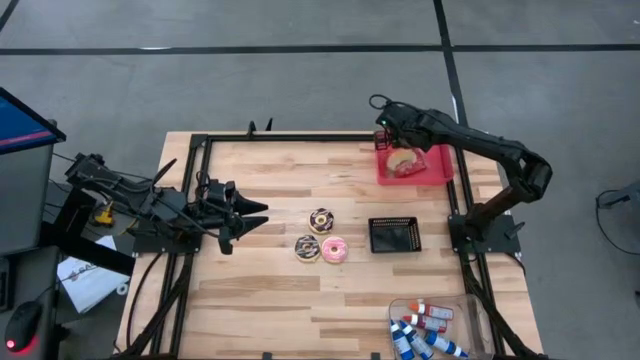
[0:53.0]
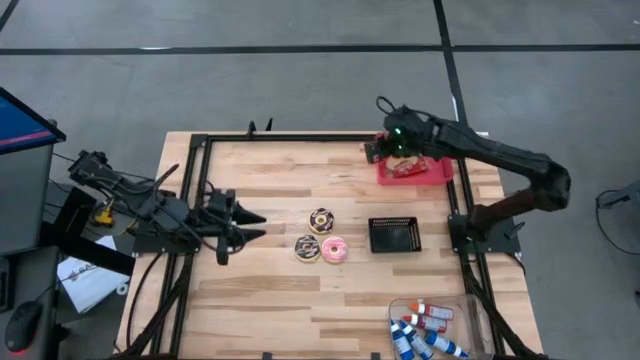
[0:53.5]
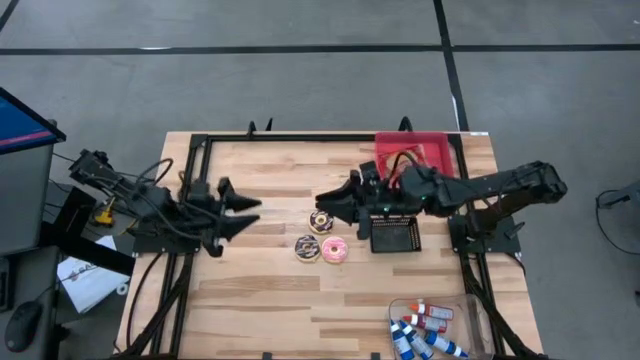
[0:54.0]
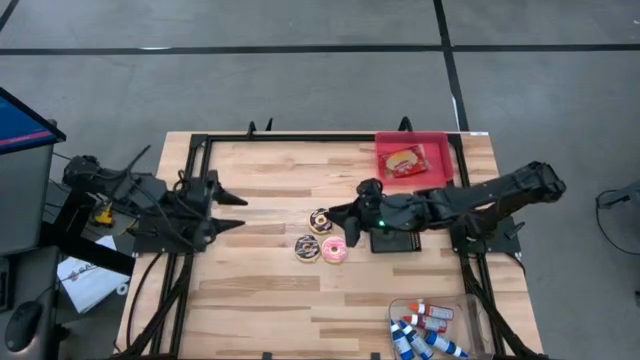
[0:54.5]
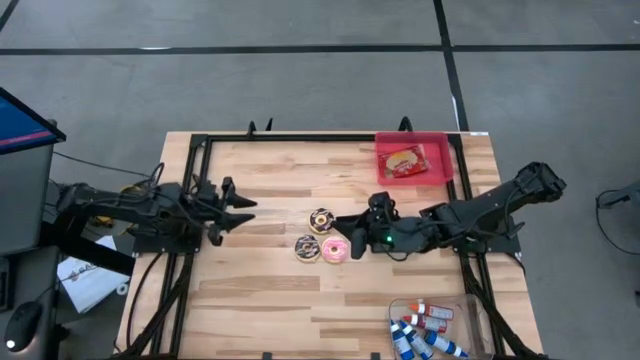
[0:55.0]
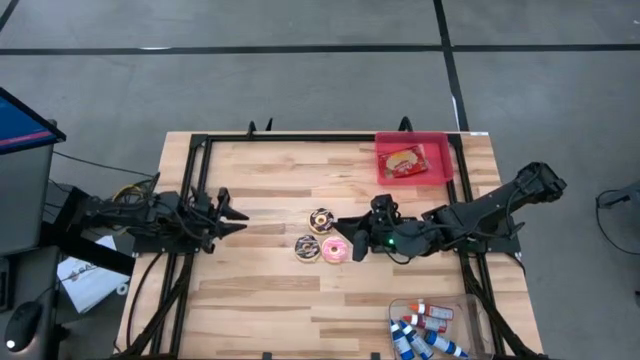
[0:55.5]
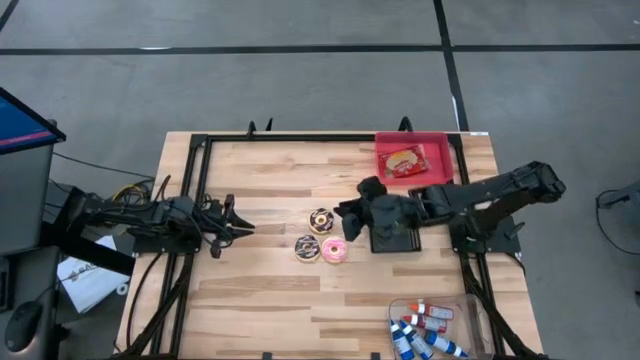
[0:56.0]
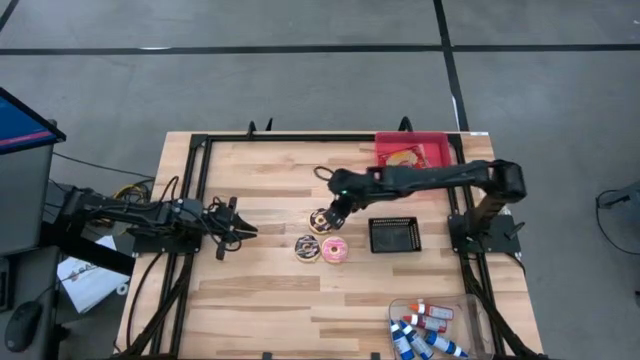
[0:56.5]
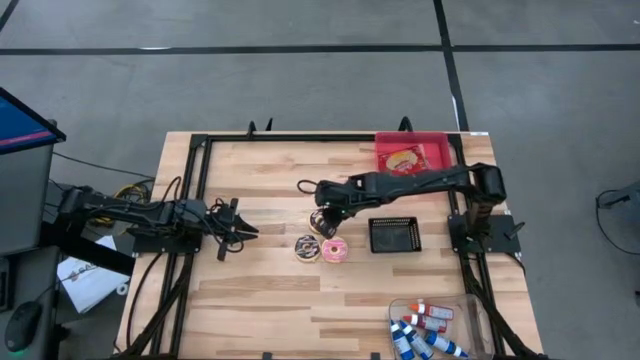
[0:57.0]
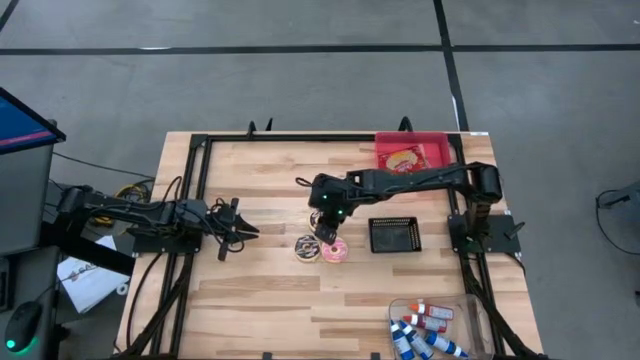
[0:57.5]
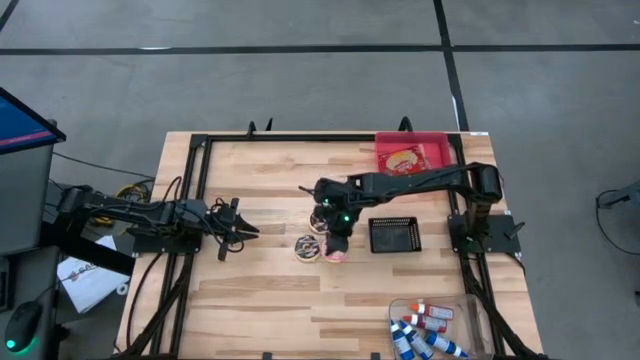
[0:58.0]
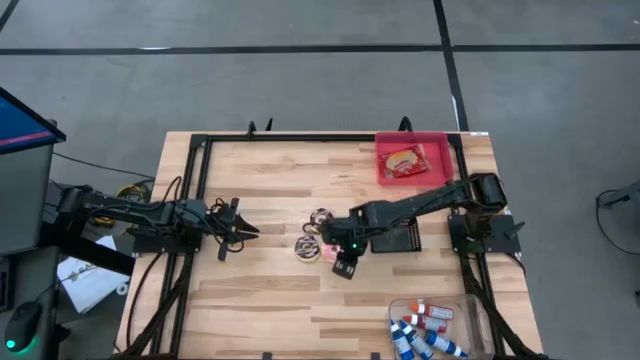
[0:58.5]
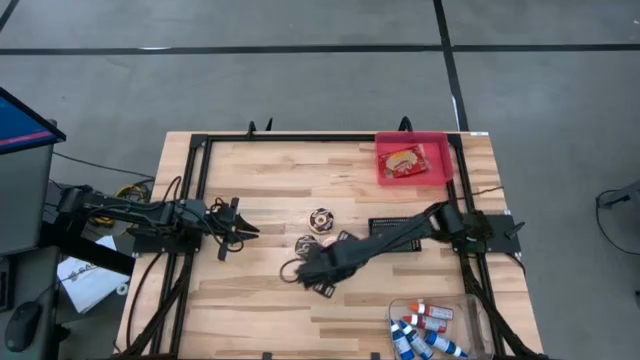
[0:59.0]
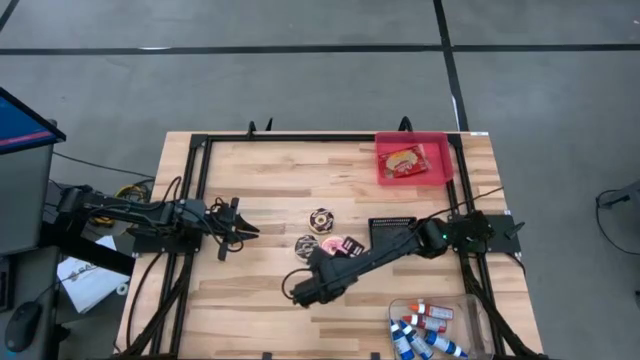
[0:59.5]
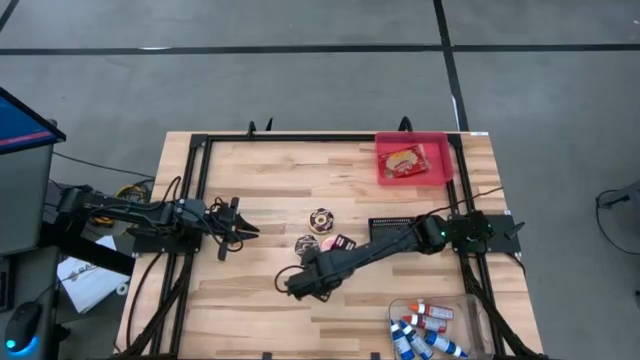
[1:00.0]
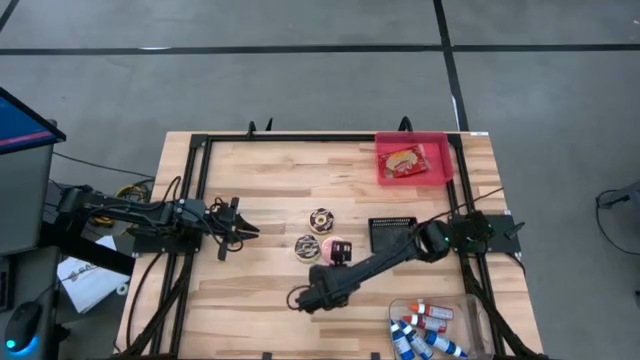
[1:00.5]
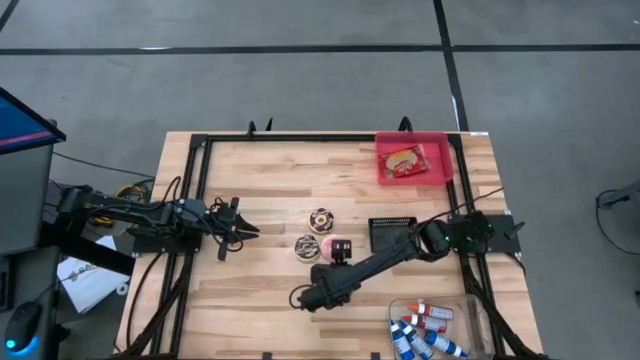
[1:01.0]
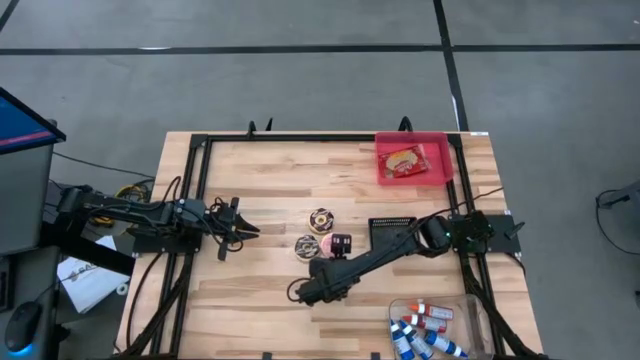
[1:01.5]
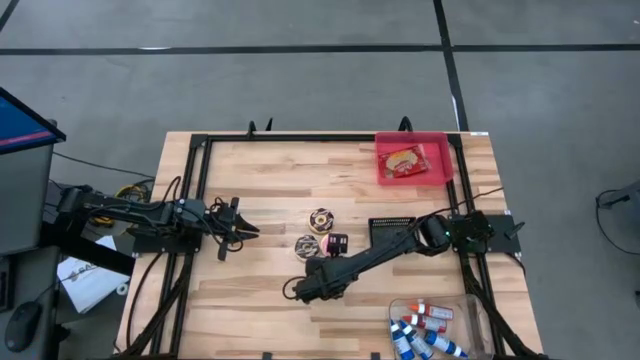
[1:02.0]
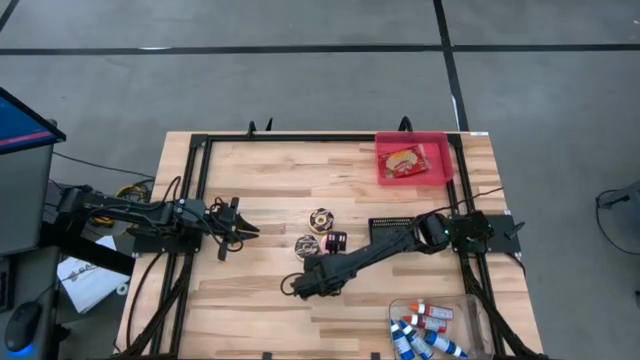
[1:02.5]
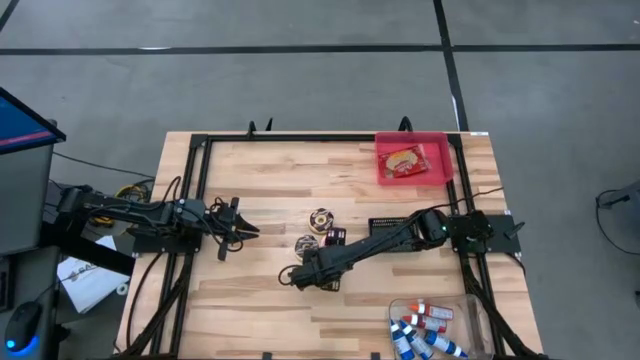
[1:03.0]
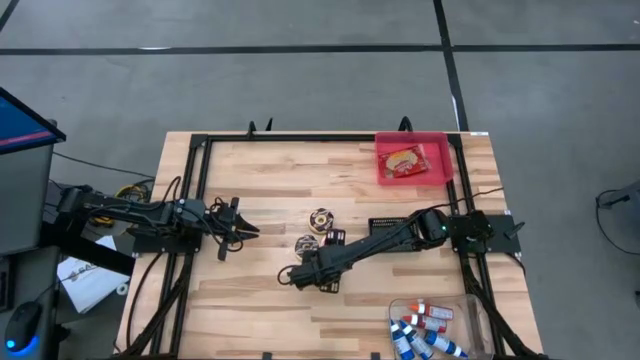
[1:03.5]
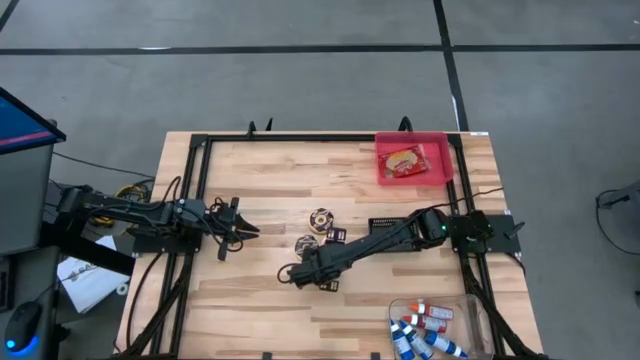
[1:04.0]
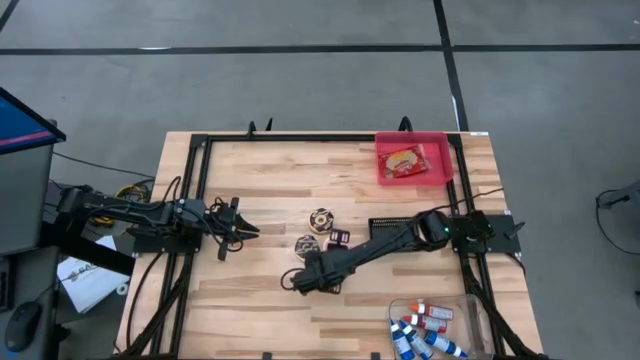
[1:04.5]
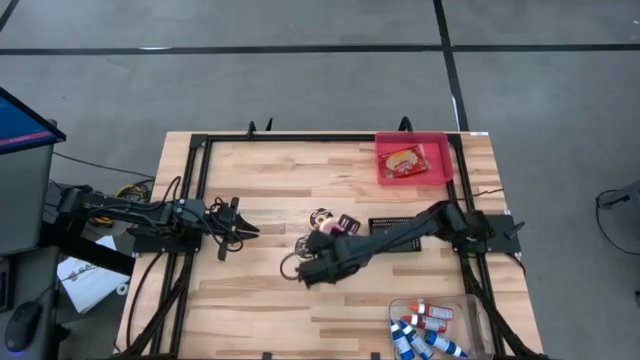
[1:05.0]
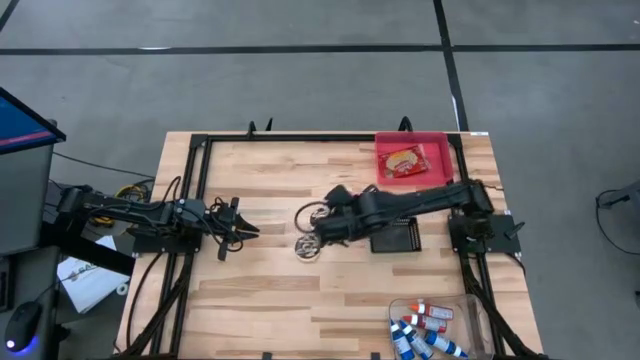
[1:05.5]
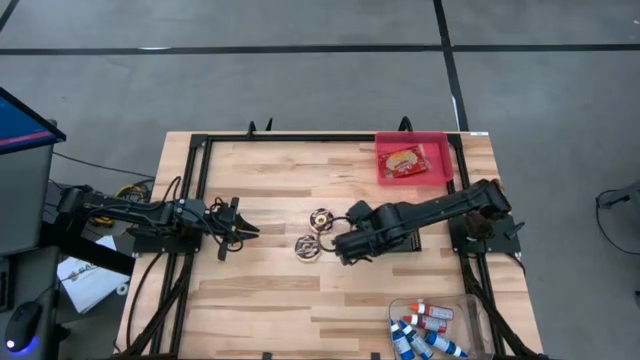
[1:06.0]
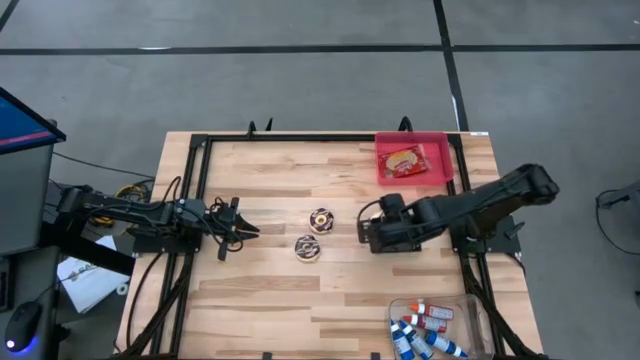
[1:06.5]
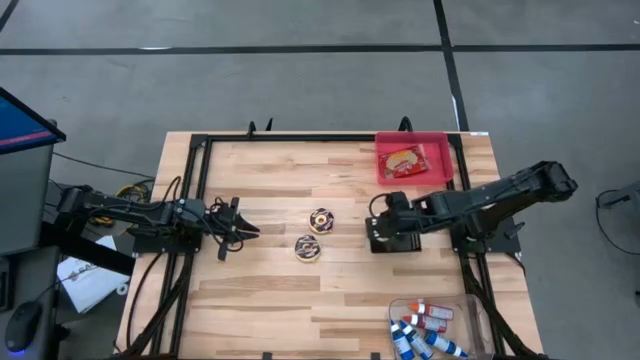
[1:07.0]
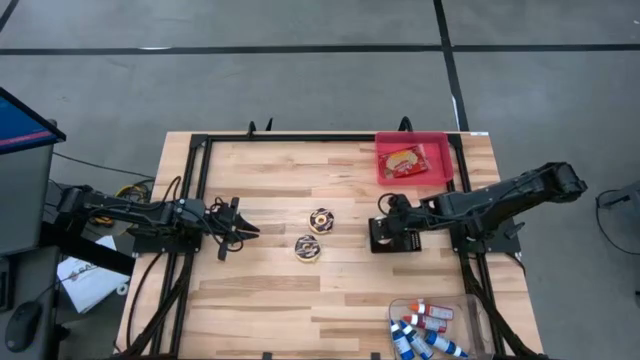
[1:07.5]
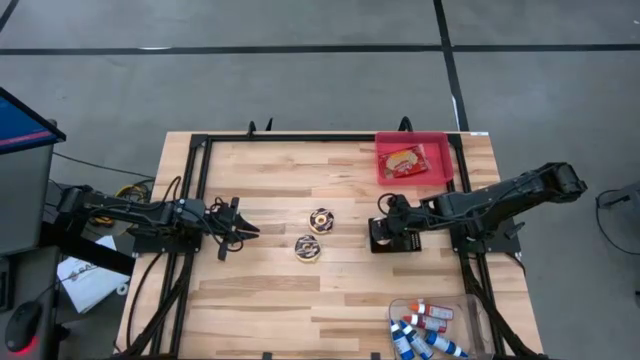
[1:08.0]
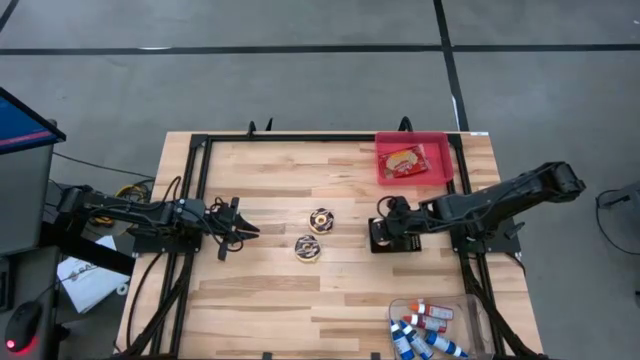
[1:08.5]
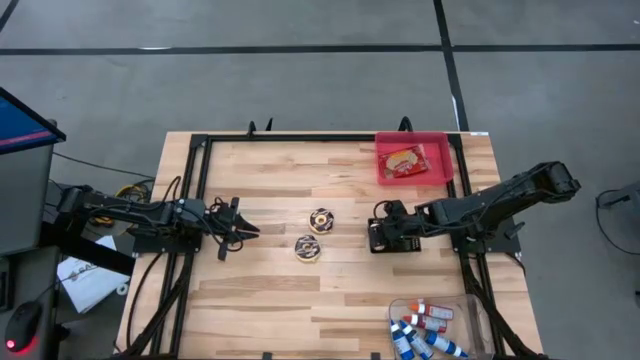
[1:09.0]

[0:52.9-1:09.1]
Put the pink donut into the black bin
